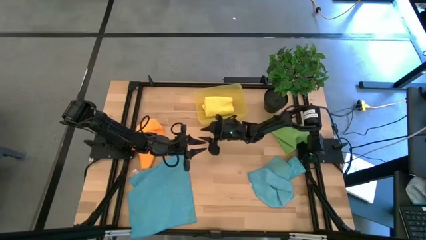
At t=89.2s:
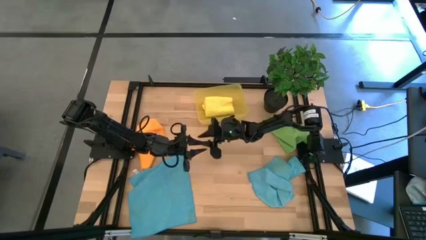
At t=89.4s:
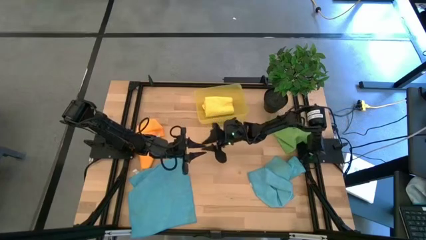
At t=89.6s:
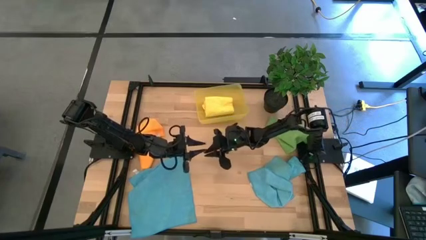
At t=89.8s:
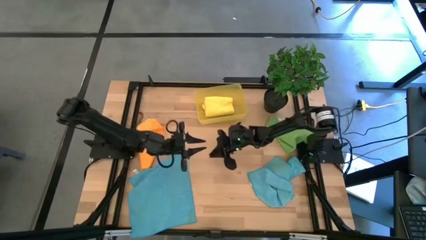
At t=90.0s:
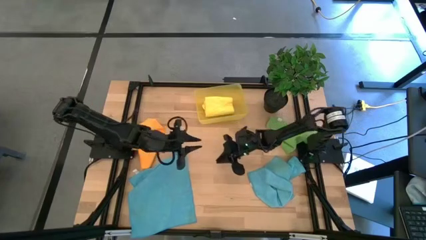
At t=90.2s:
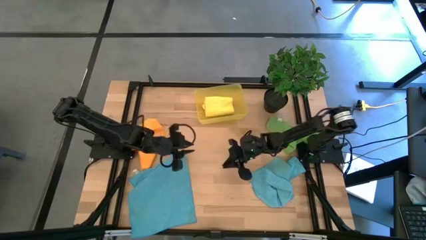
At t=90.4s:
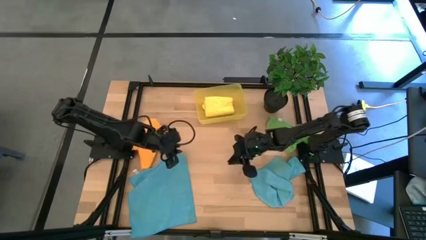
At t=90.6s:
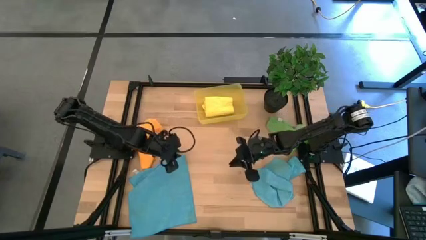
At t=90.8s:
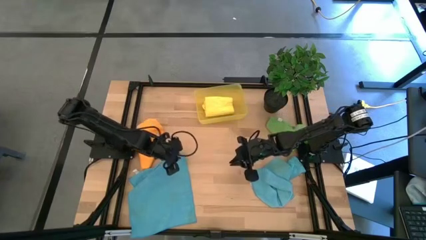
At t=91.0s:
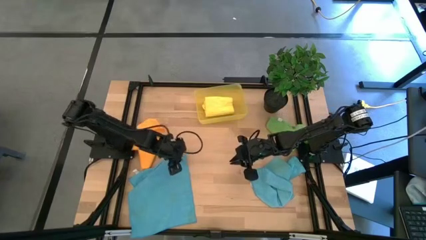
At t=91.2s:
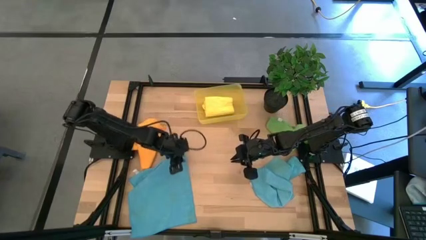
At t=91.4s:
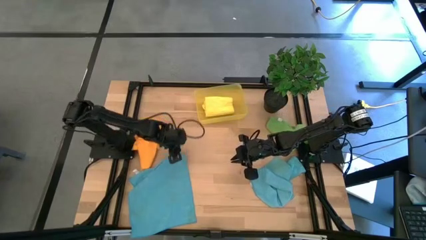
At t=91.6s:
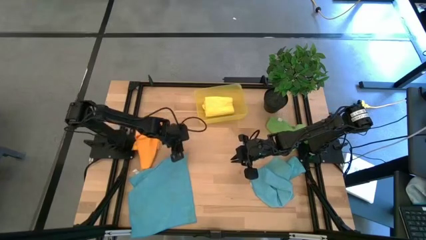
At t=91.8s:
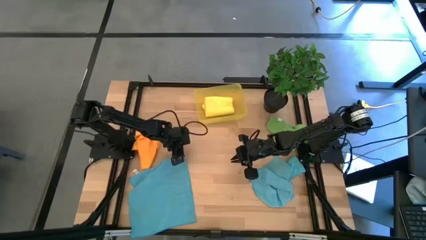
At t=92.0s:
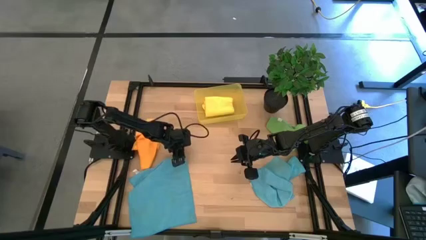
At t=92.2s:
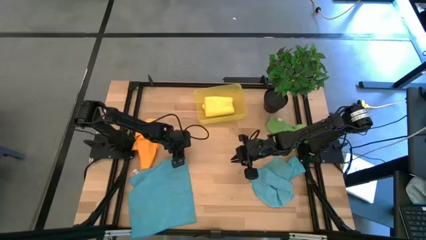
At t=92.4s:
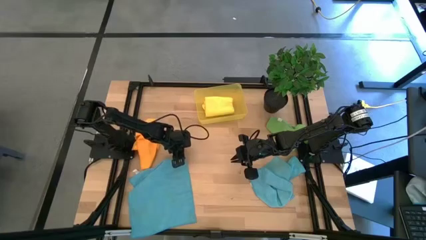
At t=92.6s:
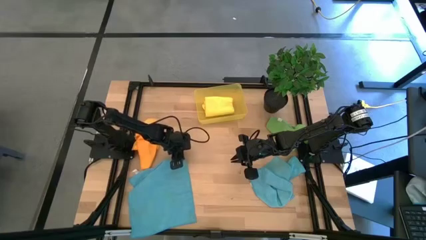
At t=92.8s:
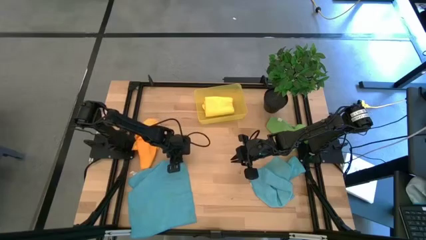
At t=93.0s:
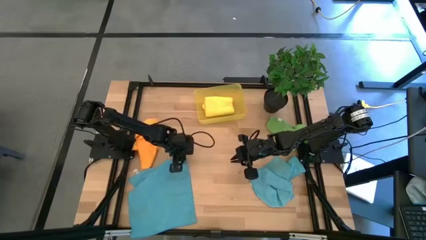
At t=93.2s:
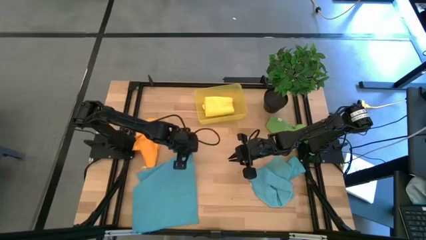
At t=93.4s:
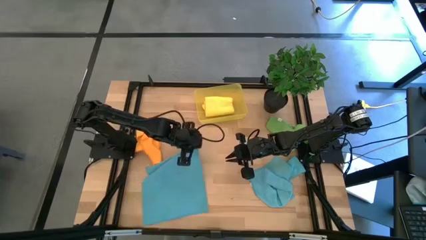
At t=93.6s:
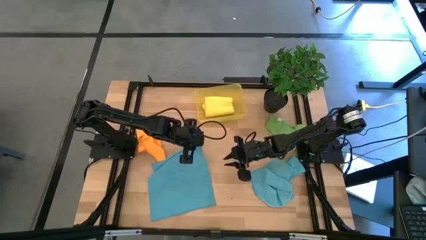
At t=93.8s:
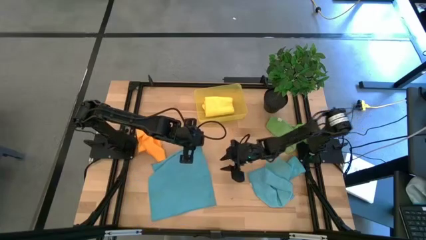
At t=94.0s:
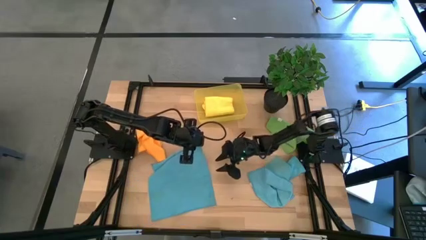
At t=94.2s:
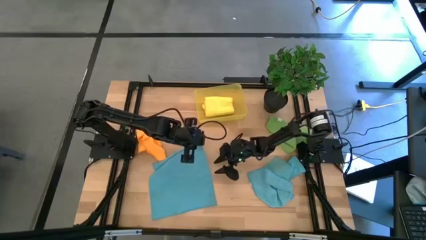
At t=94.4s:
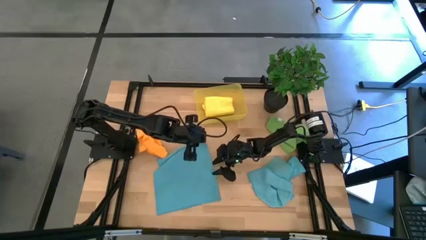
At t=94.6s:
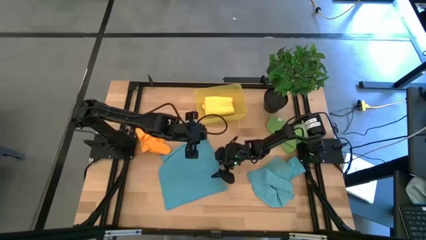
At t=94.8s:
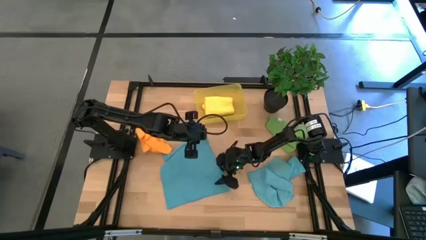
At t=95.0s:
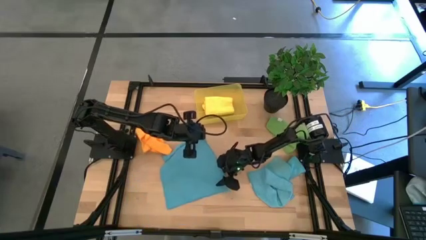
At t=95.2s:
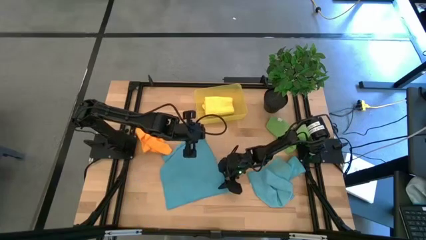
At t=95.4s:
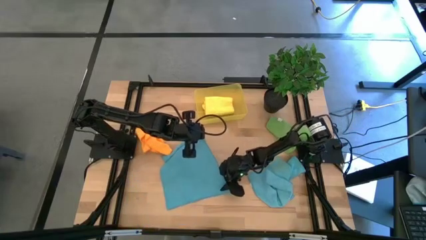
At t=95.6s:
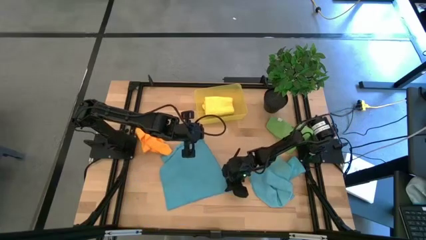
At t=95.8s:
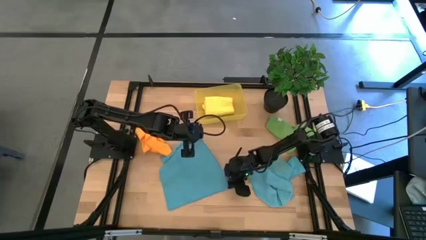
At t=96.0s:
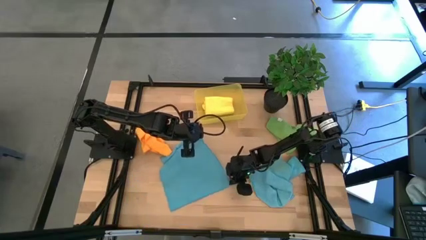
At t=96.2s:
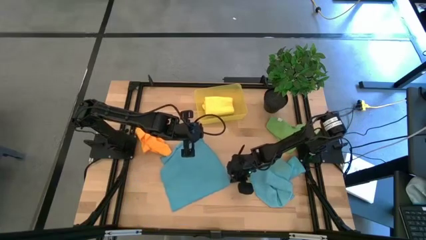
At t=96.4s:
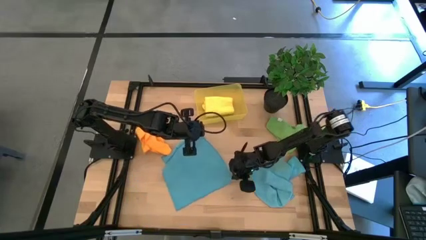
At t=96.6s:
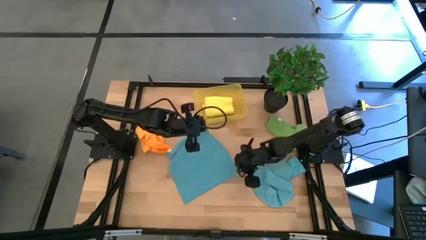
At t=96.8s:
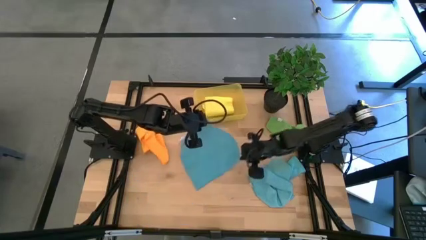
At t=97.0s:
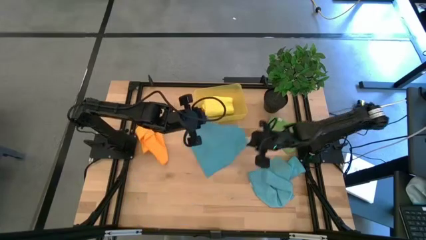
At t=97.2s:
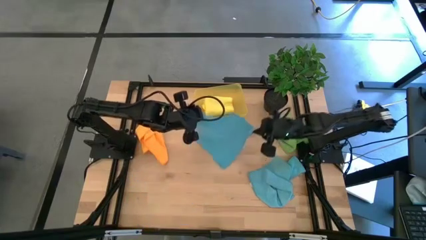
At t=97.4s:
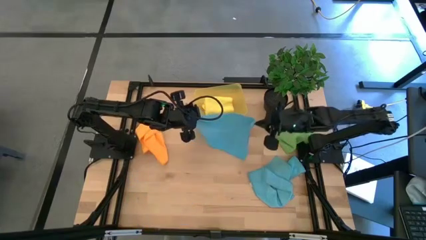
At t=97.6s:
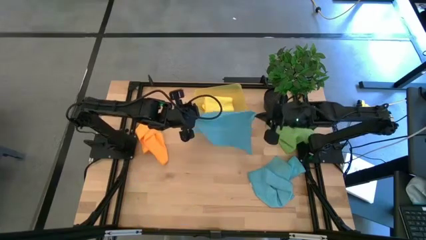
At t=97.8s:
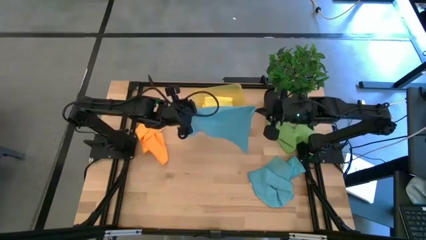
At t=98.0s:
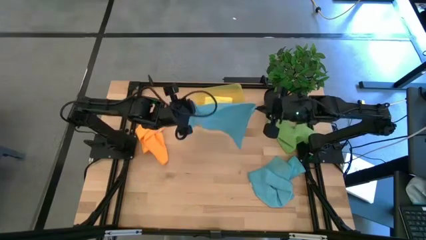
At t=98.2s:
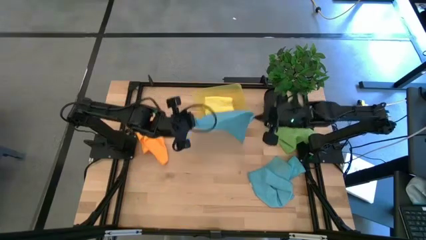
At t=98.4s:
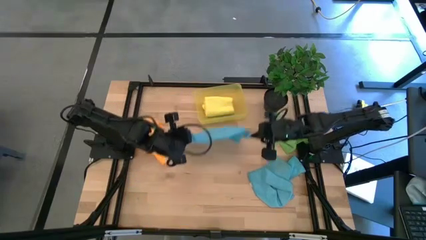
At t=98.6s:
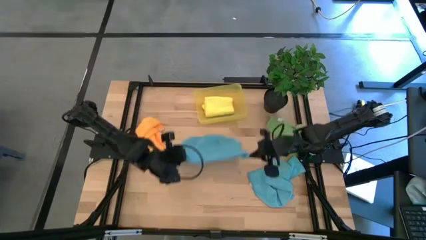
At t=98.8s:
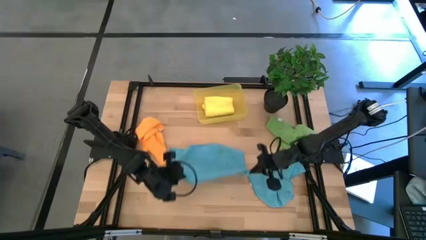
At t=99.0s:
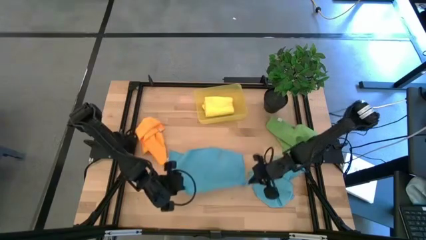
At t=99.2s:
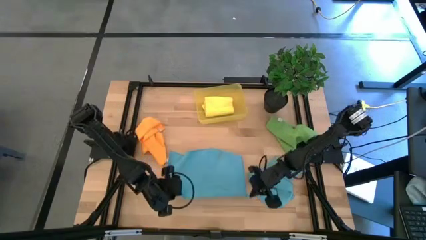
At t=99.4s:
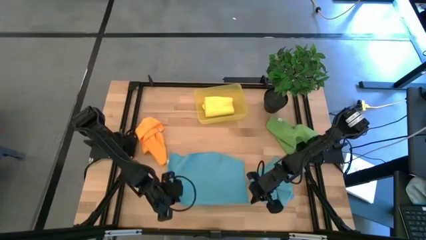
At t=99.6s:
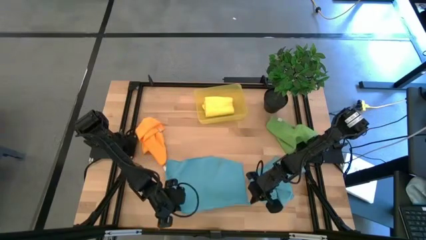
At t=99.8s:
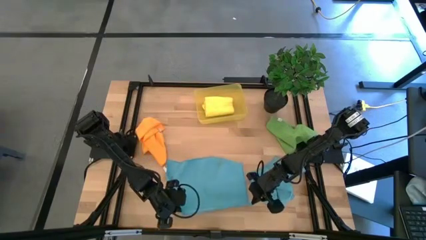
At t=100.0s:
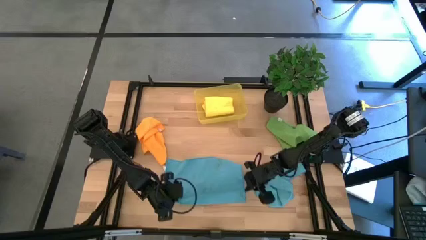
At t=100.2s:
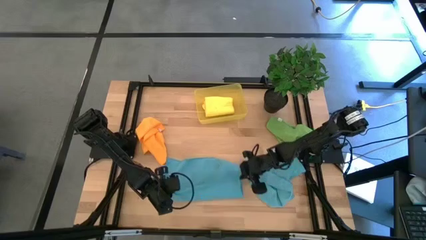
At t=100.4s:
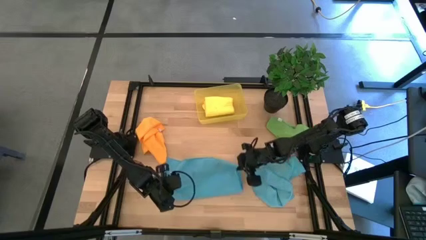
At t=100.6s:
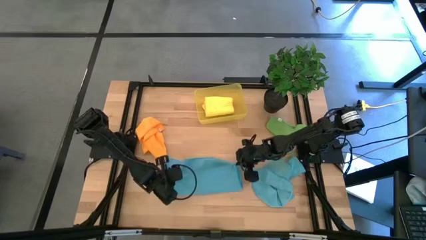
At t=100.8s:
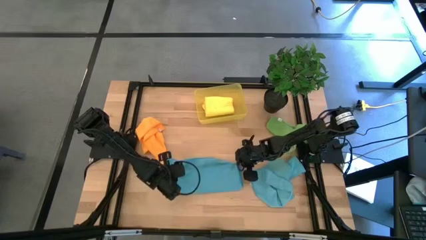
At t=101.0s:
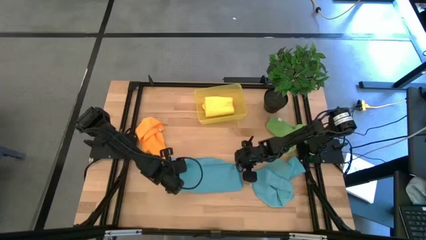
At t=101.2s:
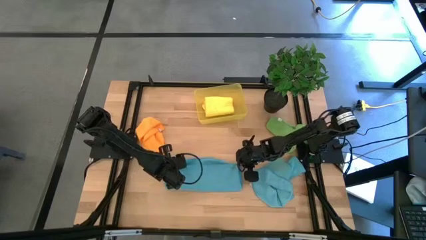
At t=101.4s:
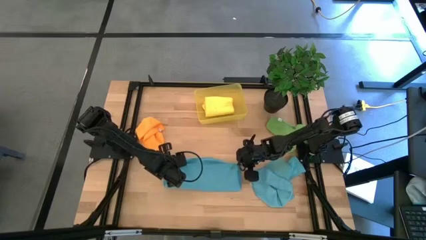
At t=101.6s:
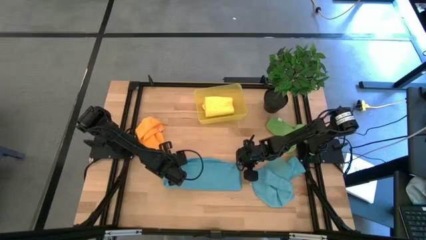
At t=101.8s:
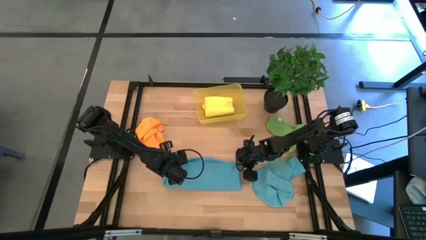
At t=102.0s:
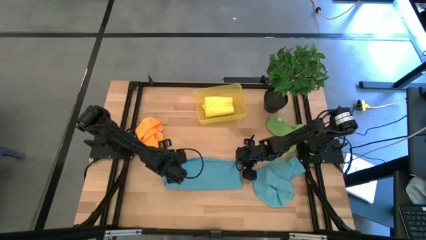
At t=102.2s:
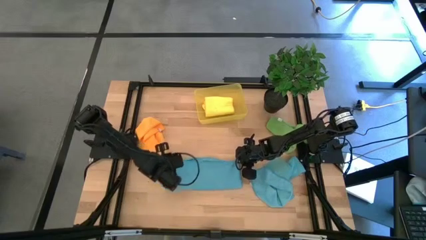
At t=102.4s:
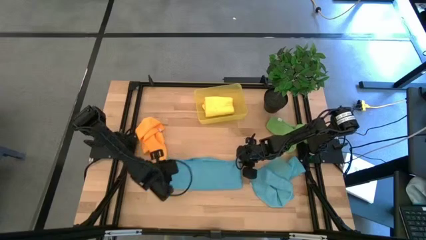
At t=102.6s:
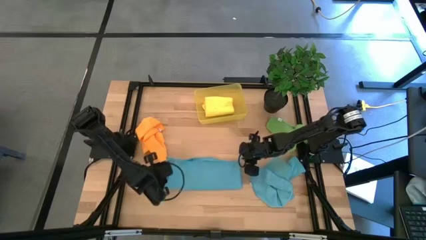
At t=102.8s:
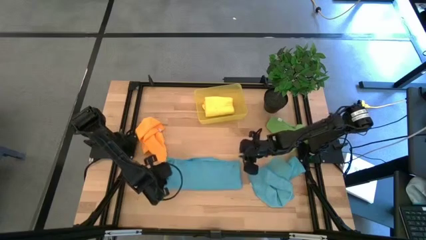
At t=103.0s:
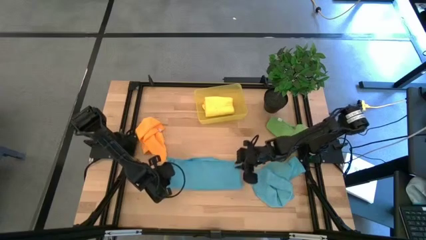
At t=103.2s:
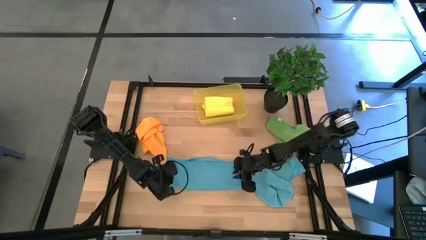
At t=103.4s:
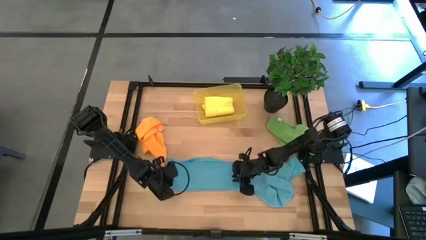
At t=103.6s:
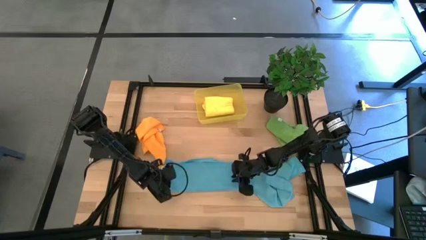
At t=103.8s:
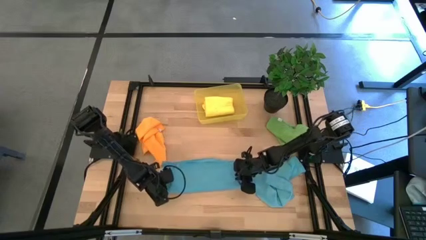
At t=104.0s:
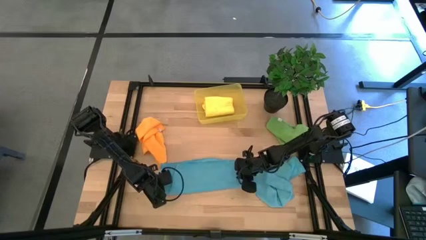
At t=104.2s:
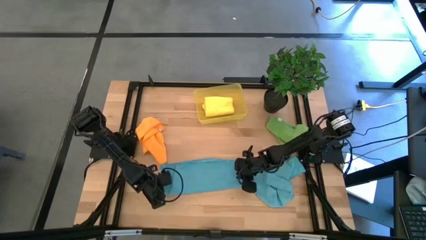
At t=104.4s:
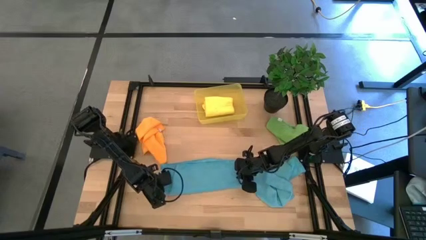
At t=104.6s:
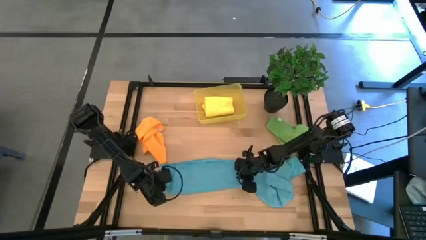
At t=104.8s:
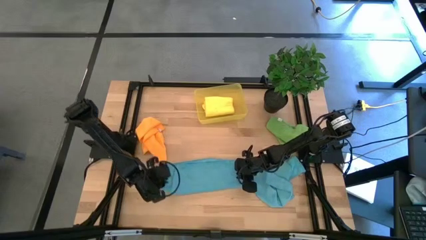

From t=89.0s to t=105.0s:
Task: Fold microfiber towels
Fold the left blue microfiber towel
